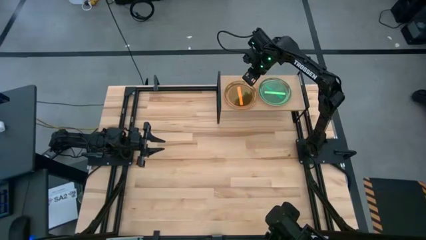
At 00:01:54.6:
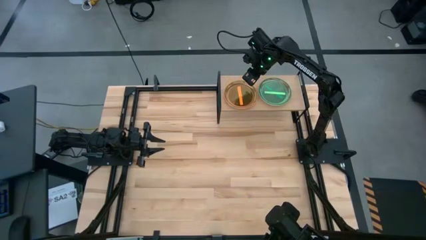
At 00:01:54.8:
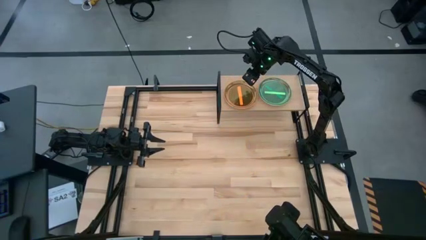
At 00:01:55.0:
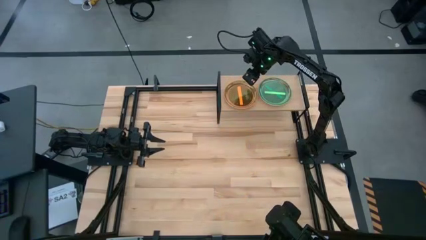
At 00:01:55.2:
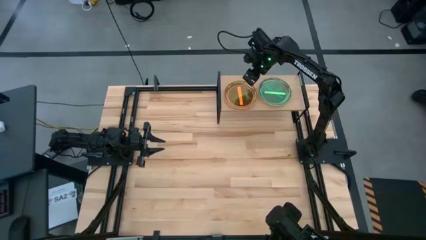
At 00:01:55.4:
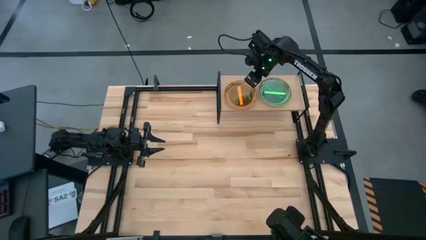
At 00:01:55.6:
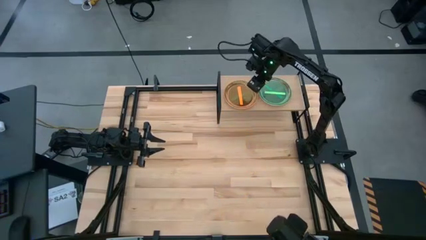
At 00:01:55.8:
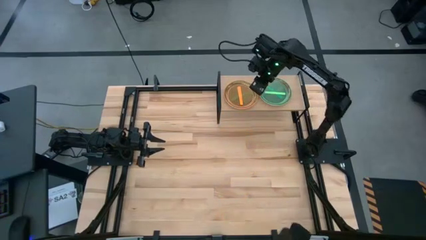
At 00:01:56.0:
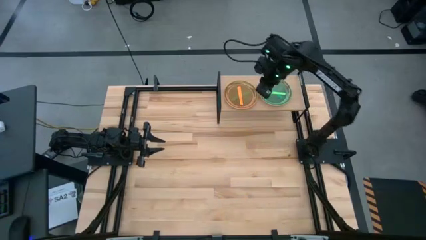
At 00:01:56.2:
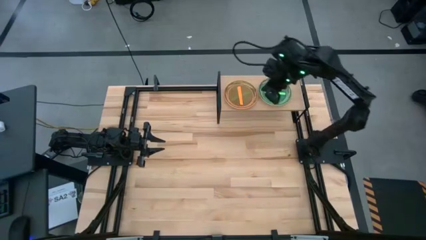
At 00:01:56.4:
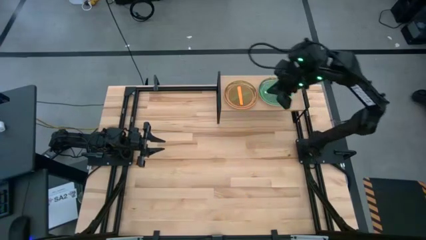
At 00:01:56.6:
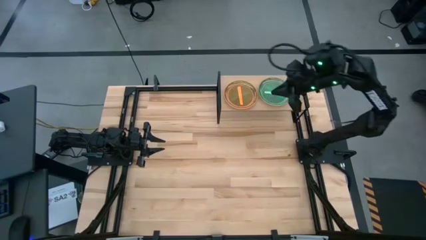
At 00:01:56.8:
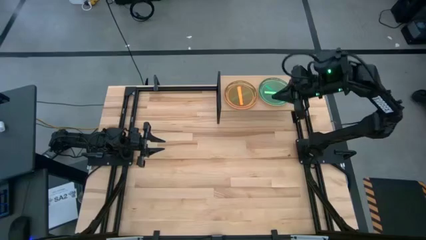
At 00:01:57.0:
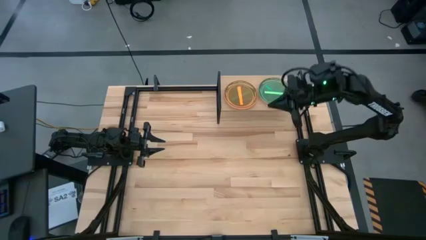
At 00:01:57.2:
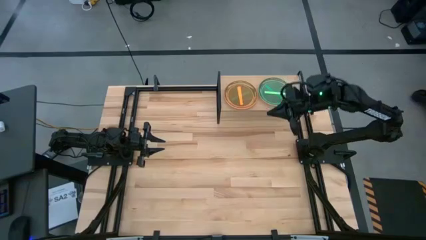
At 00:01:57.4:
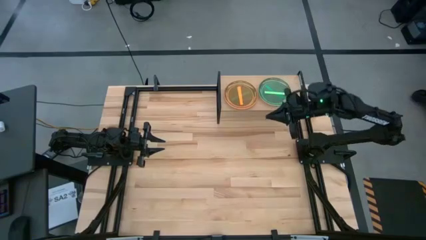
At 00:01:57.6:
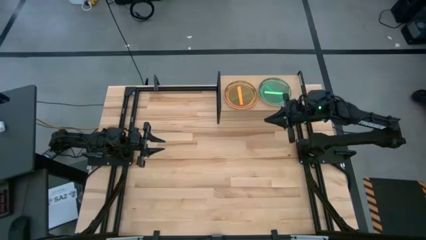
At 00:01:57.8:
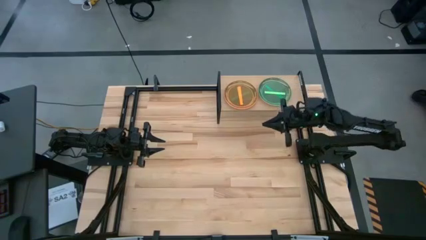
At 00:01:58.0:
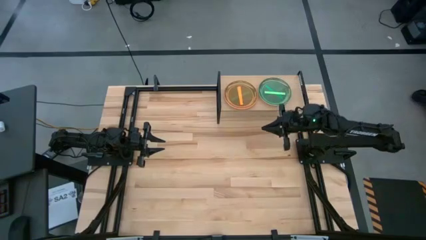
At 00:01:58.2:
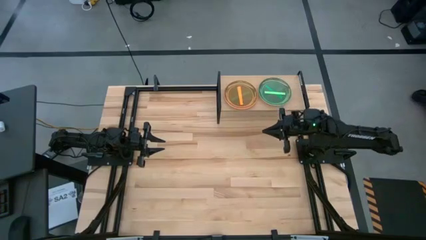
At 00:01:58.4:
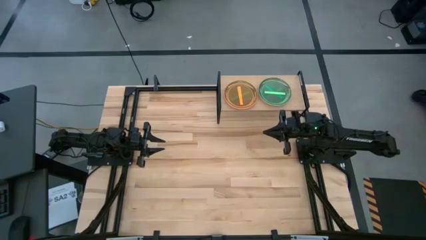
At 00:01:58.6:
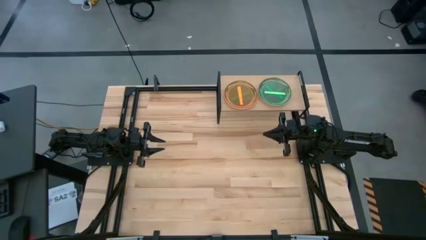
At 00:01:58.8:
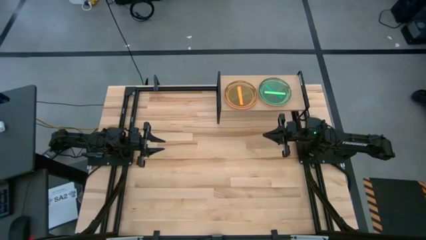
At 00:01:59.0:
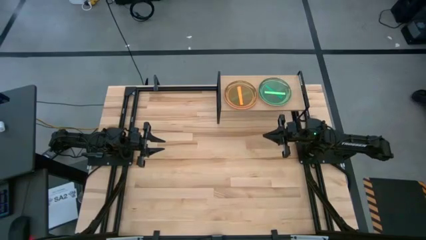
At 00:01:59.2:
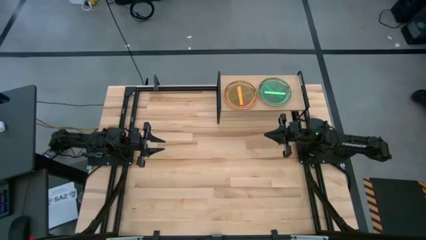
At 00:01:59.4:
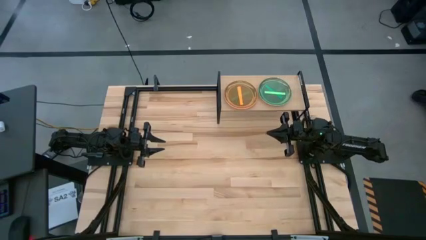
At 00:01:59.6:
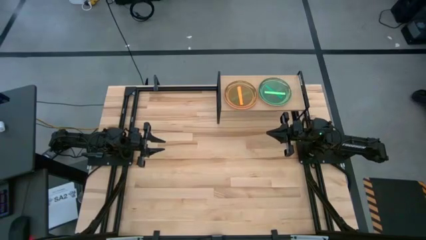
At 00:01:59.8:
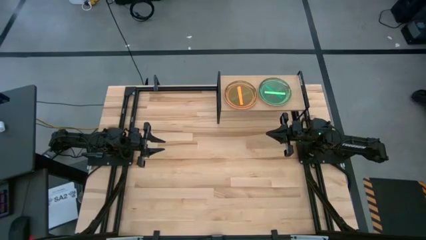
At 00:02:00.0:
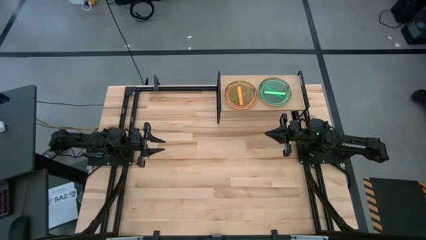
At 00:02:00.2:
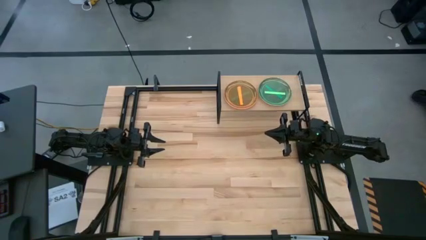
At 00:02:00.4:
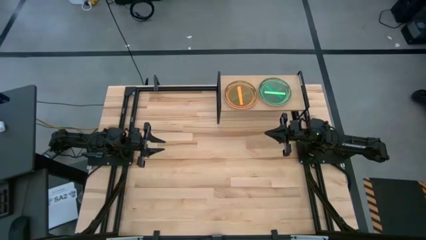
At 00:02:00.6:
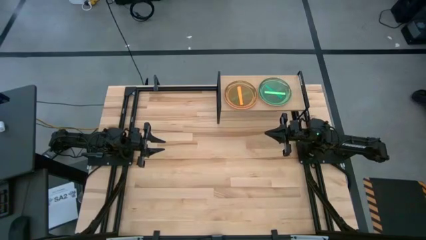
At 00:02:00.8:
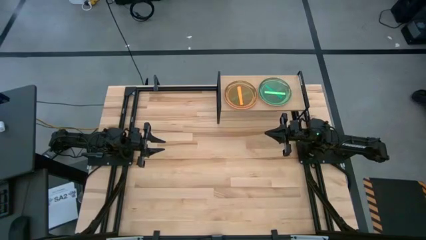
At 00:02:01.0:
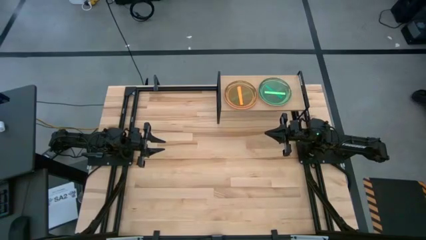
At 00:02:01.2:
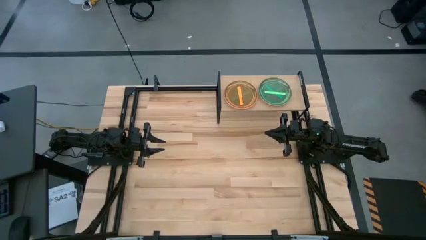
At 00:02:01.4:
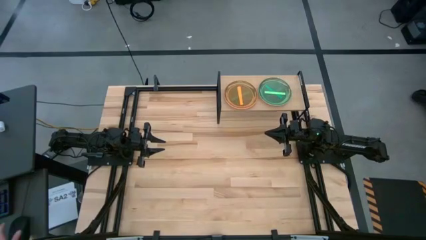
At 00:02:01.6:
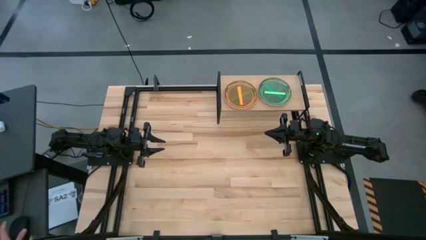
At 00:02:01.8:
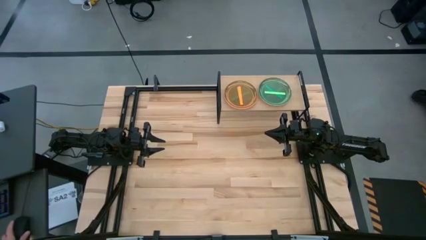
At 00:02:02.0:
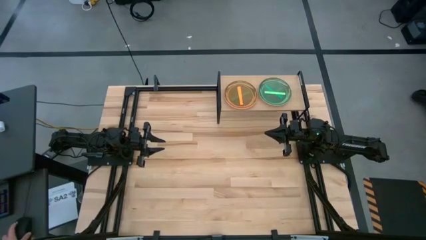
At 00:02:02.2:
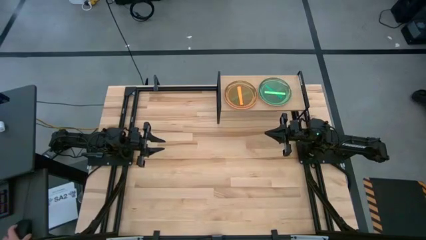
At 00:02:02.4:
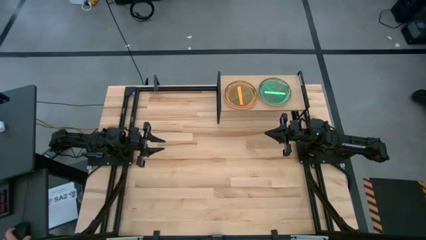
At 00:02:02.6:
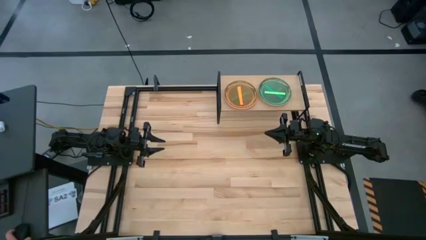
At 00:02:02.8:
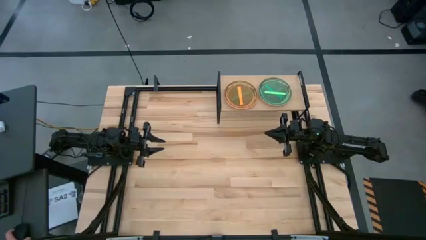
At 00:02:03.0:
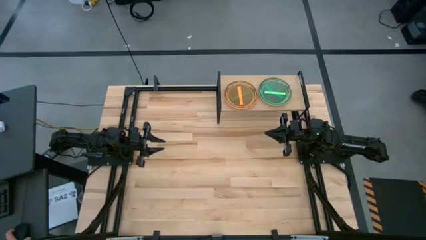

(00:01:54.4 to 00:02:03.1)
Task: Place and stack plates onto a shelf
Return to Home Position
